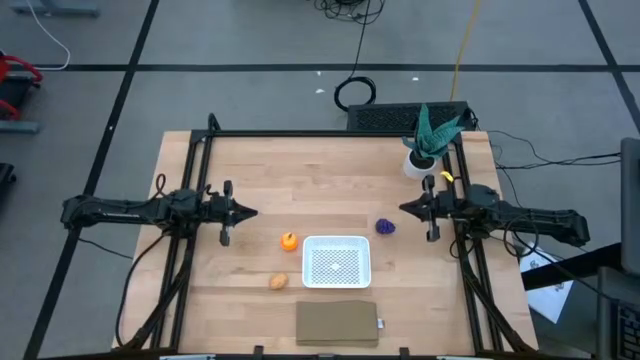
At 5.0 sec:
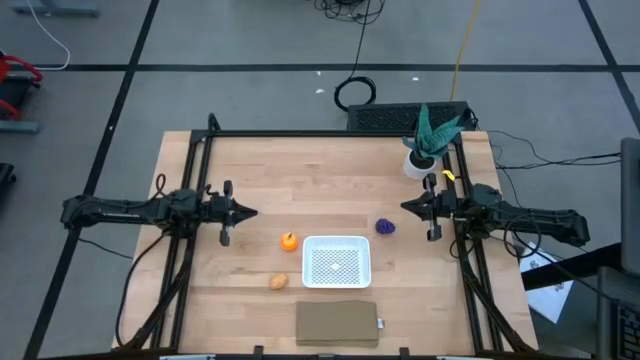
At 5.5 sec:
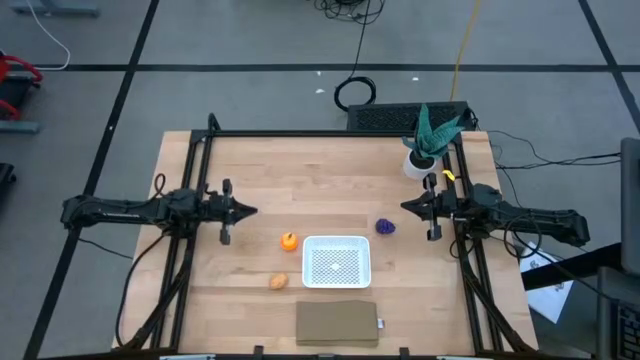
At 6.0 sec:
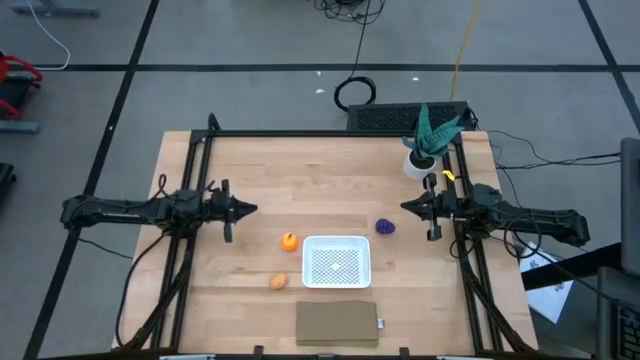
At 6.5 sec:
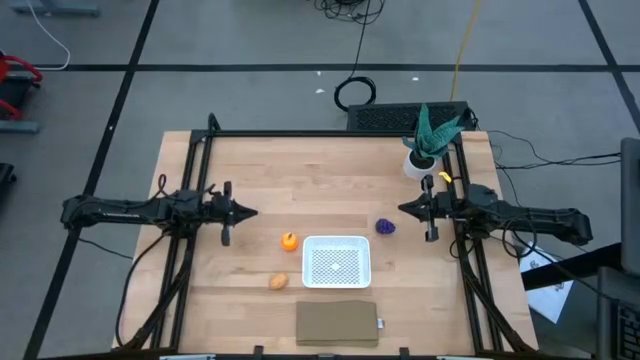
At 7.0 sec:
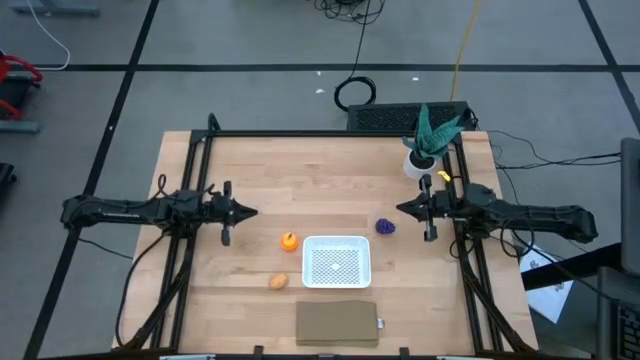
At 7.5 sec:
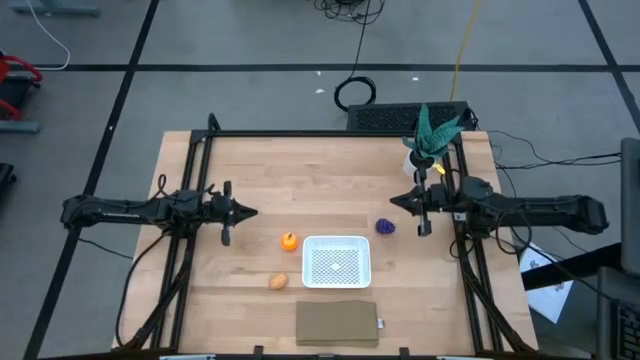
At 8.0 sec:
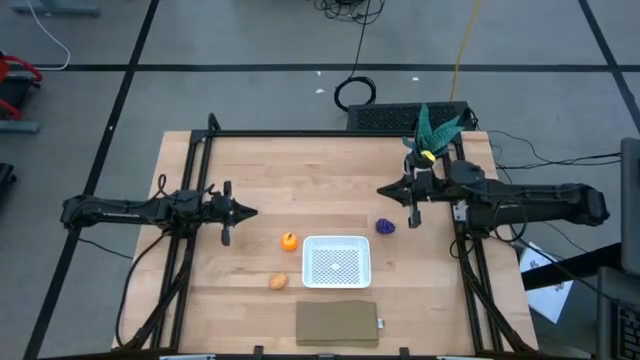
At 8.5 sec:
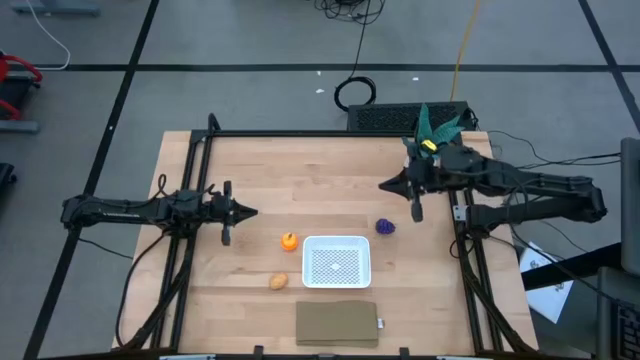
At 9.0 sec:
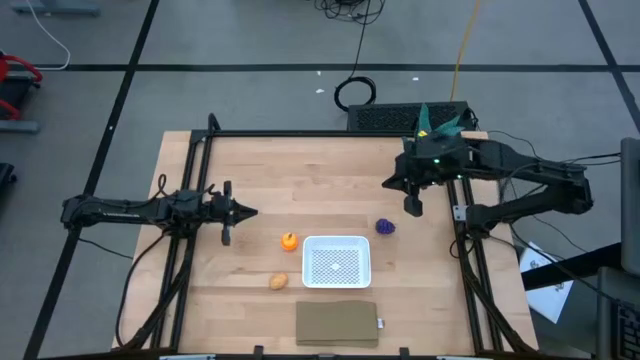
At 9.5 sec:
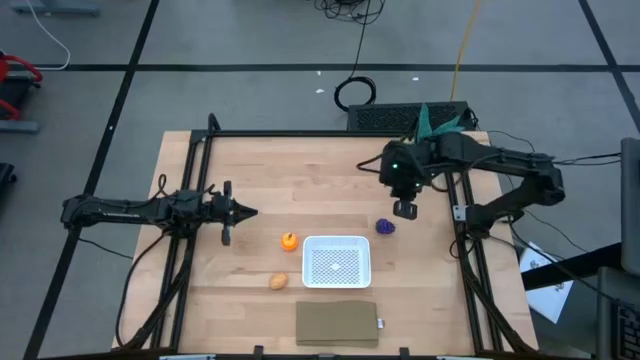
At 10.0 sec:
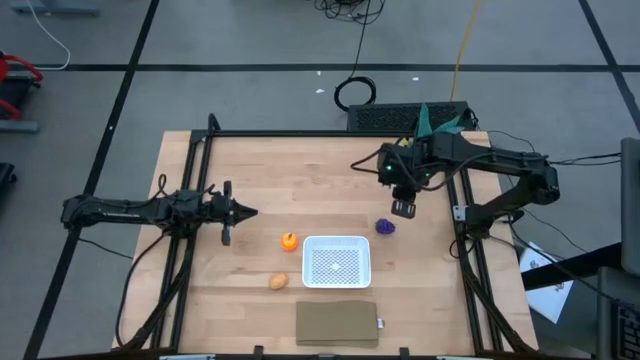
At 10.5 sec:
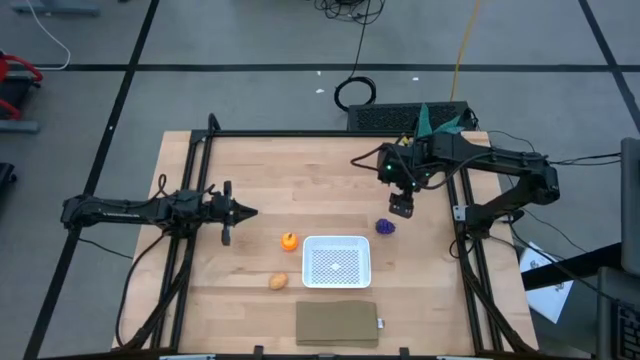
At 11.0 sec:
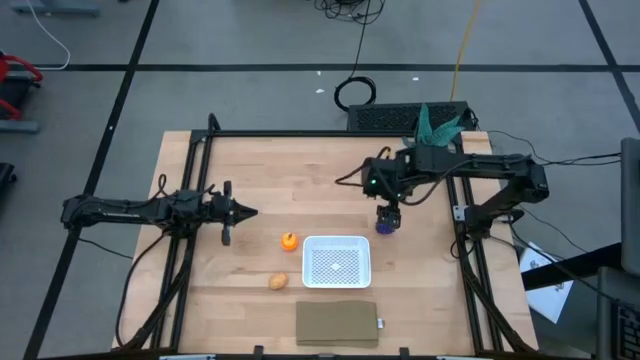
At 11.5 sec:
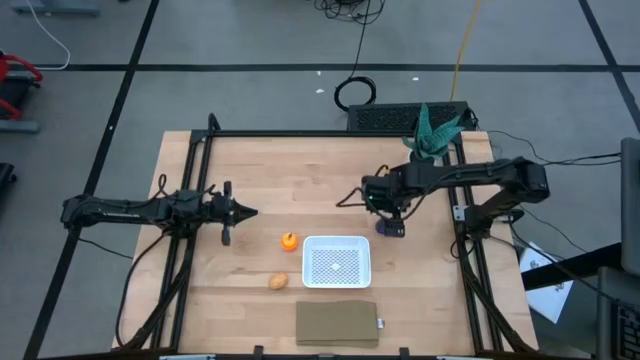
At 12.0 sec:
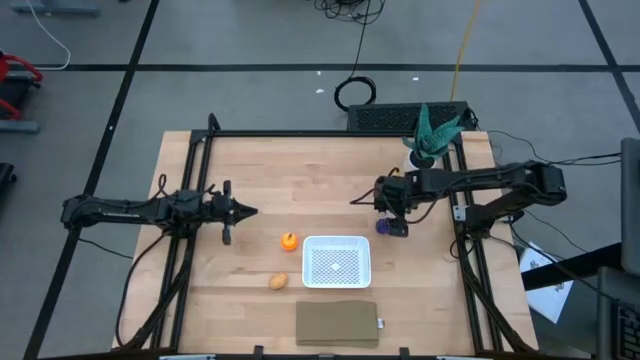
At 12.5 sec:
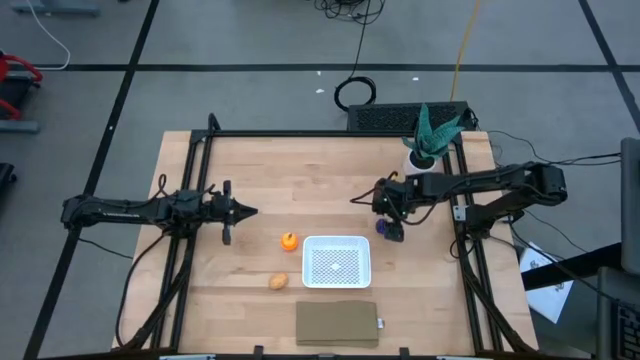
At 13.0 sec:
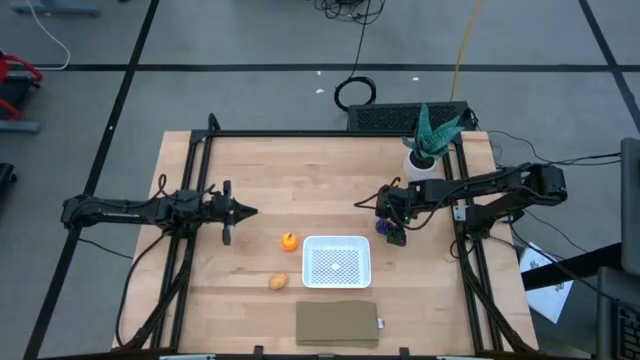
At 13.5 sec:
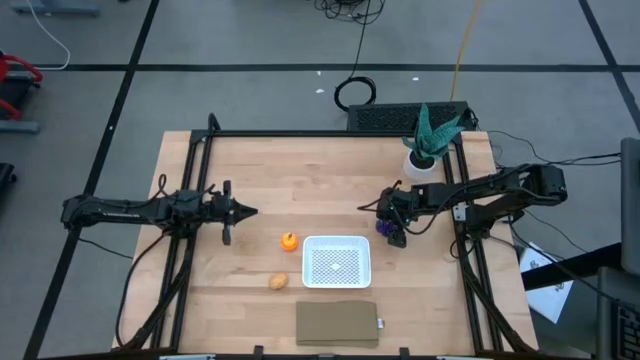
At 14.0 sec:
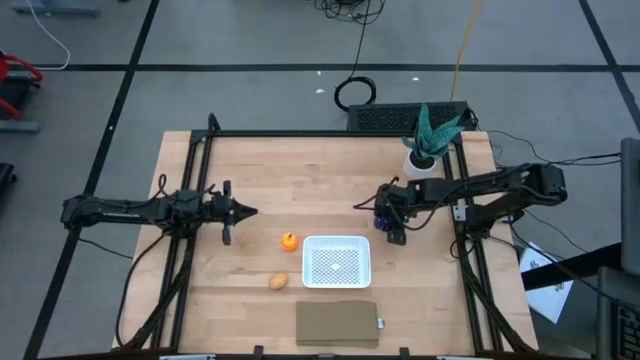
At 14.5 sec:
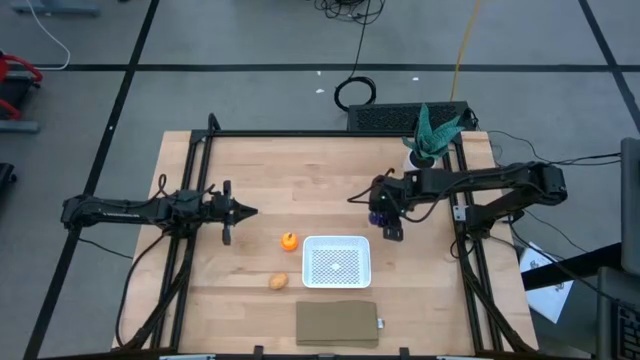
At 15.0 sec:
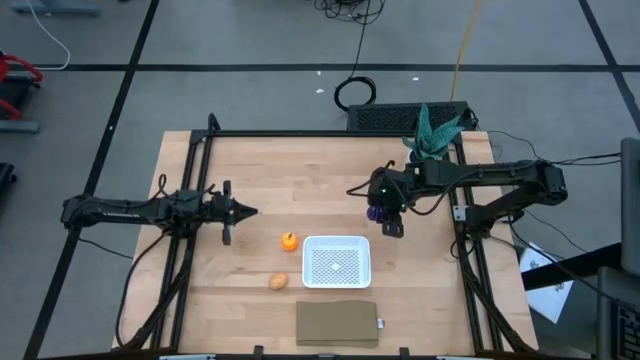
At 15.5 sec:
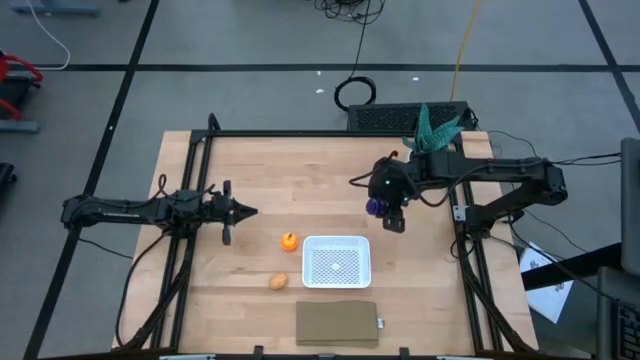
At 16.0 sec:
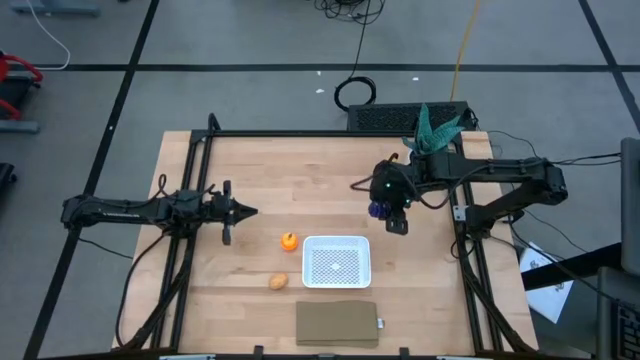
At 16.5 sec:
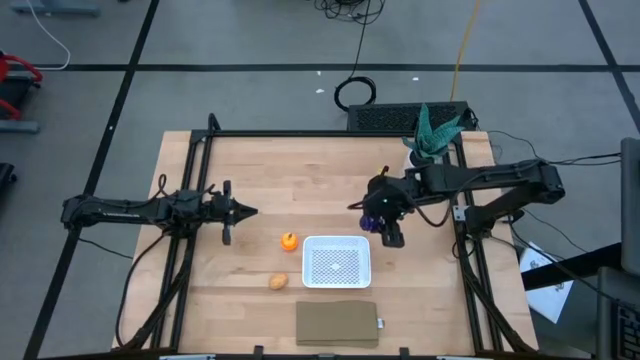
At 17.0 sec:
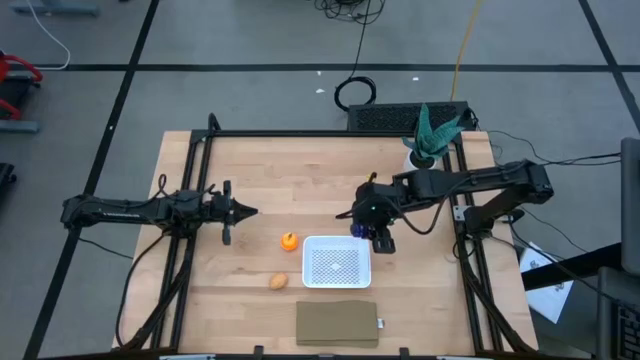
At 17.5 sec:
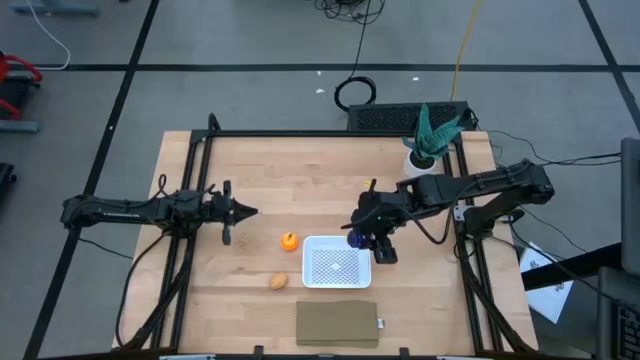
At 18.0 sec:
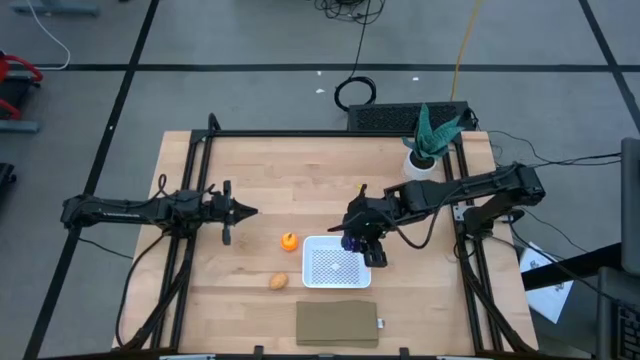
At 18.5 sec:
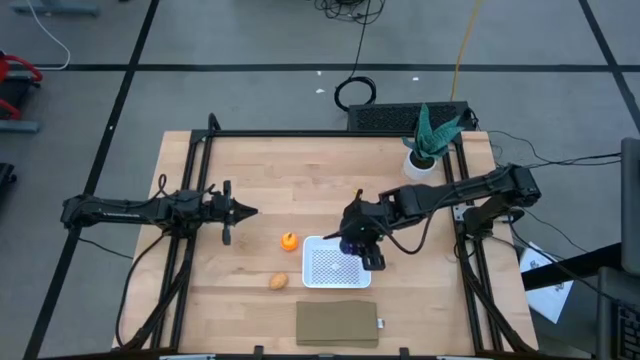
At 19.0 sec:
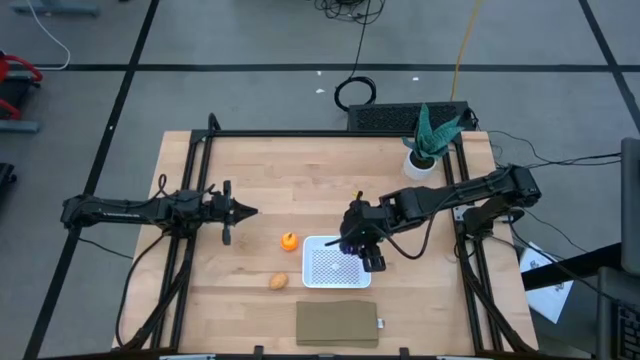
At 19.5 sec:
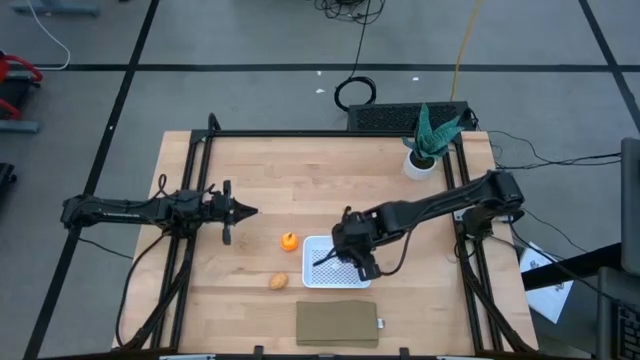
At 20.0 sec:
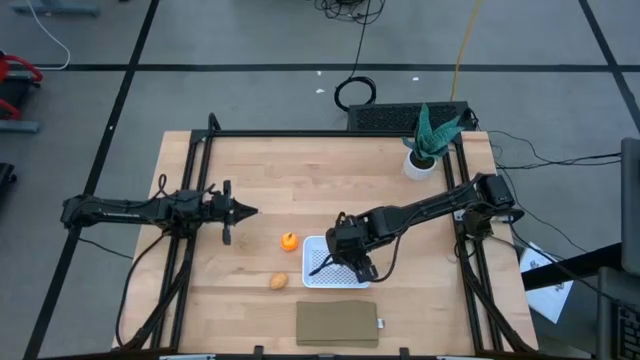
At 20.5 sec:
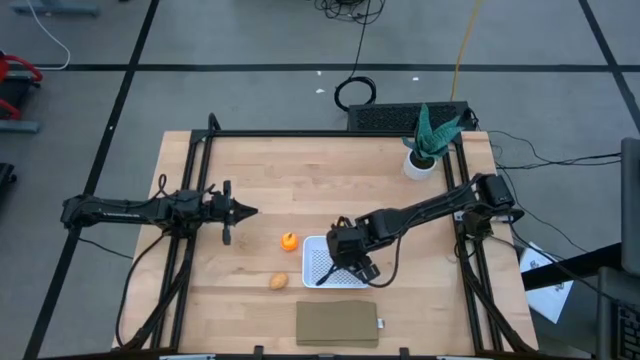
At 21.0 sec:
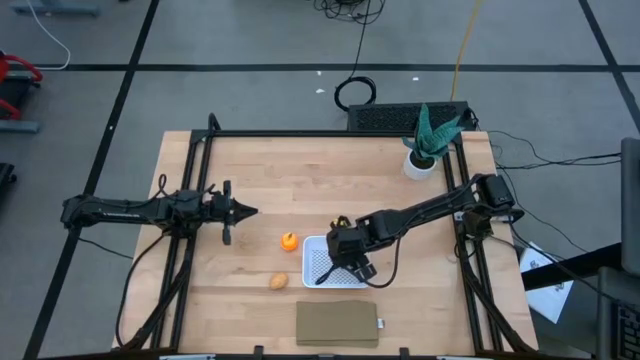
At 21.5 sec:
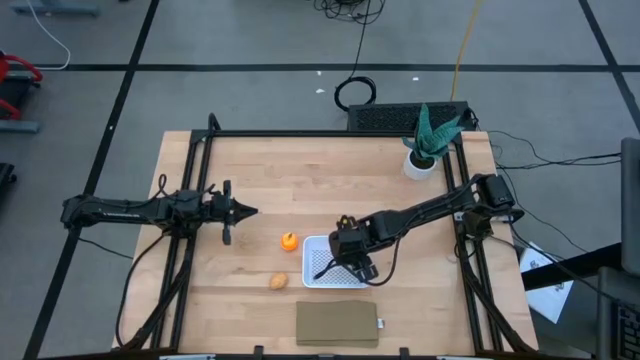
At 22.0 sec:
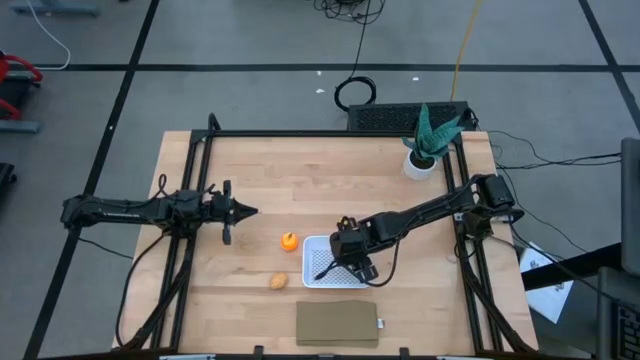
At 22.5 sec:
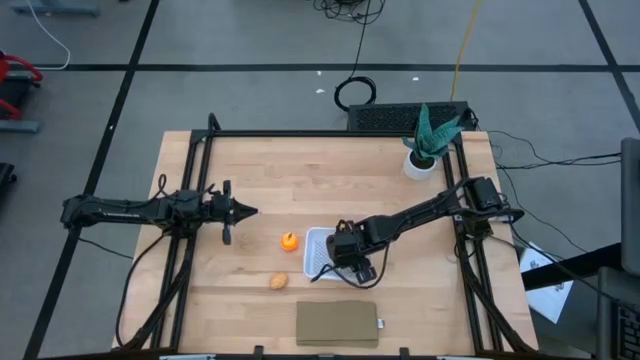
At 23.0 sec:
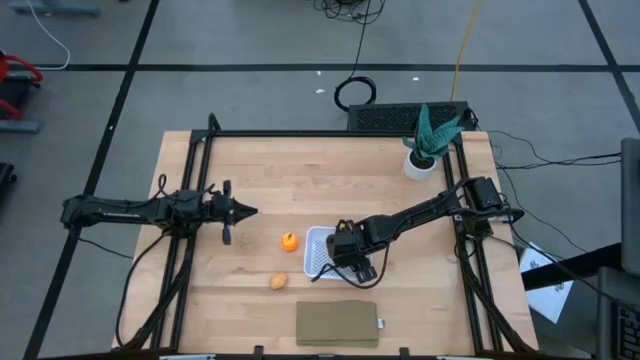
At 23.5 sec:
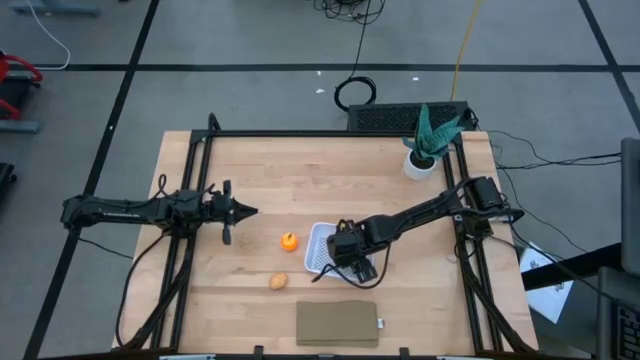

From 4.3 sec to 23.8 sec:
Task: Pick and placing Produce into tupperware
Put the purple grapes into the white basket

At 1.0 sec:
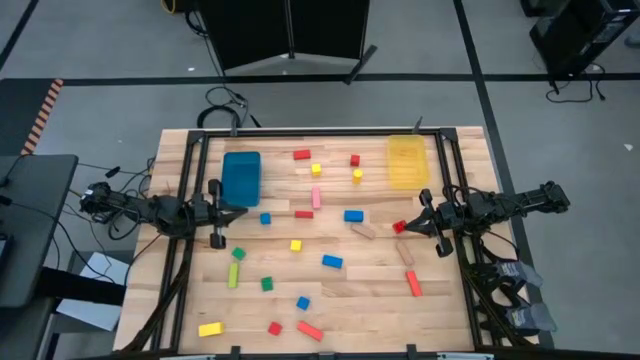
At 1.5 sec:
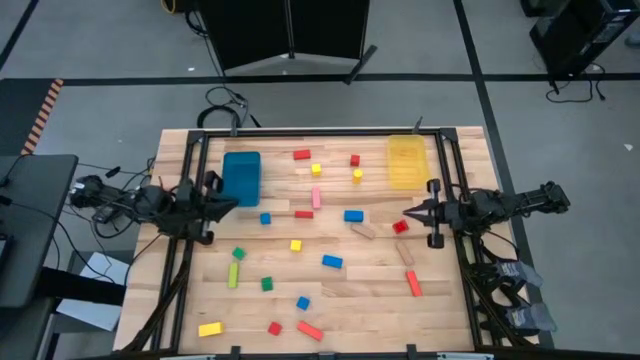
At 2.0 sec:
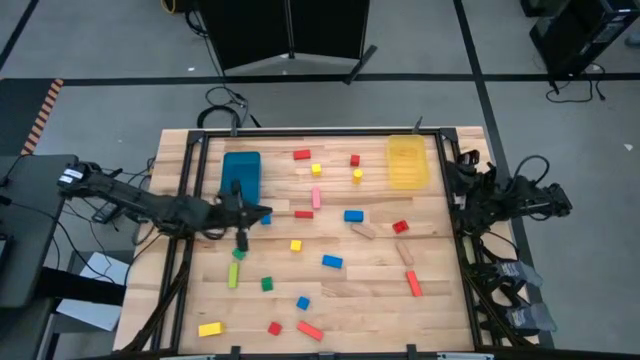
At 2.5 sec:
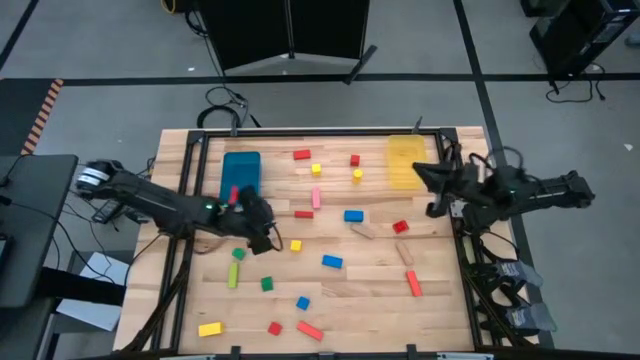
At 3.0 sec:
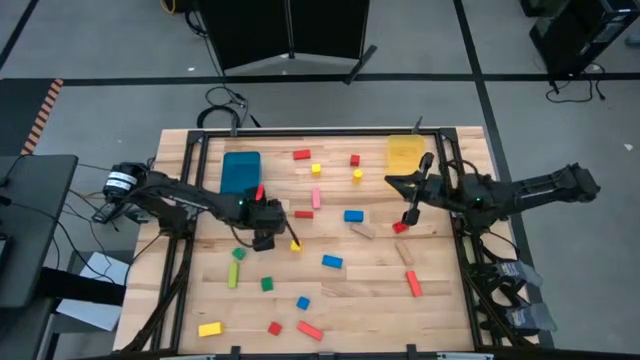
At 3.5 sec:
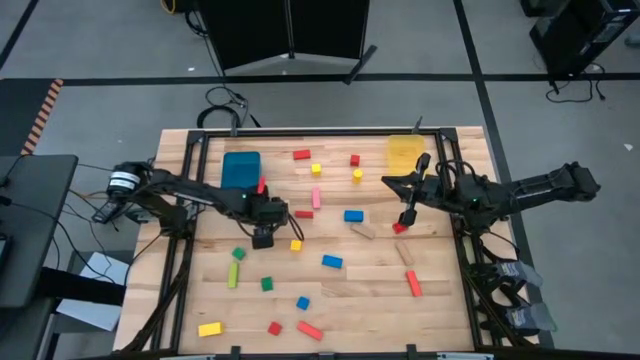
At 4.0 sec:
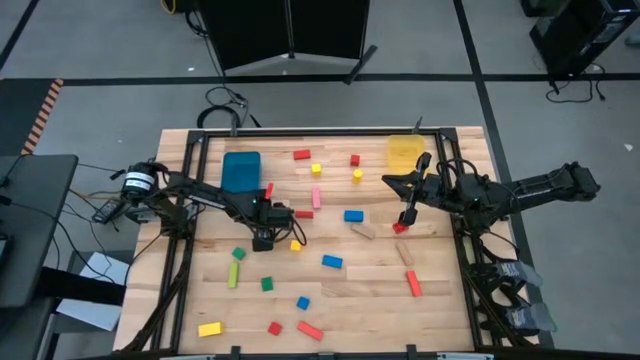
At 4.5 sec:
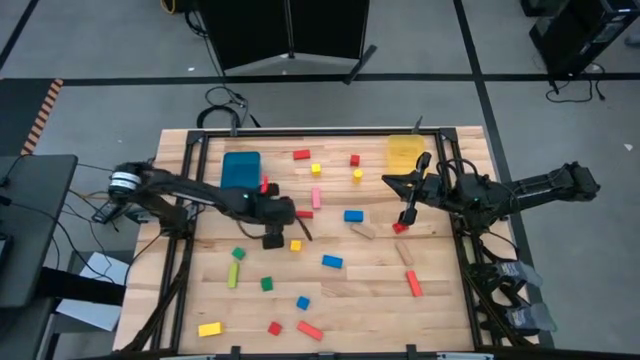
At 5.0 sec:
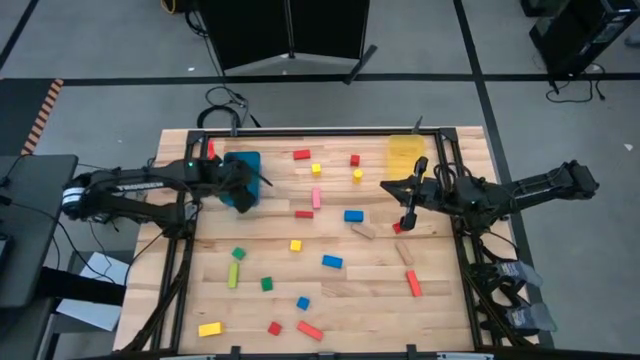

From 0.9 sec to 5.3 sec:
Task: Sort blocks by size
Put the small blue block into the blue bin
